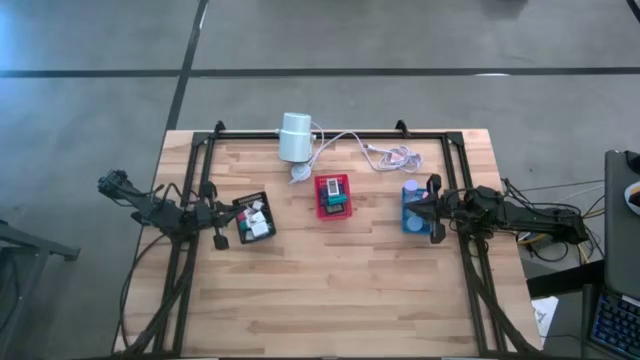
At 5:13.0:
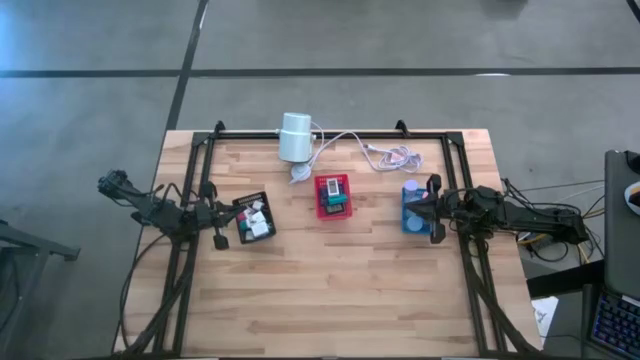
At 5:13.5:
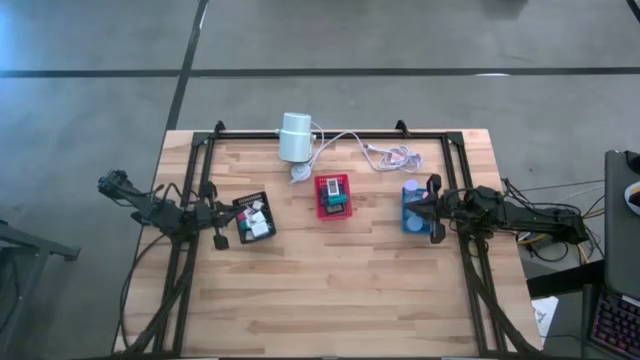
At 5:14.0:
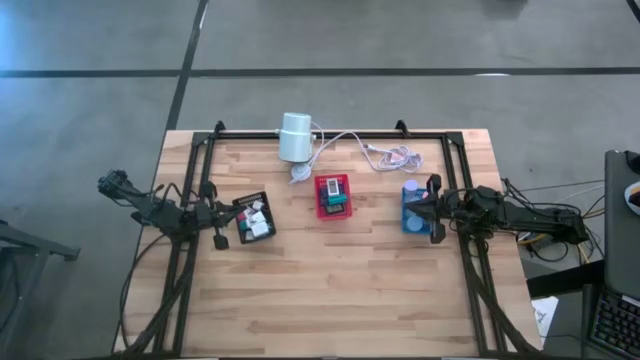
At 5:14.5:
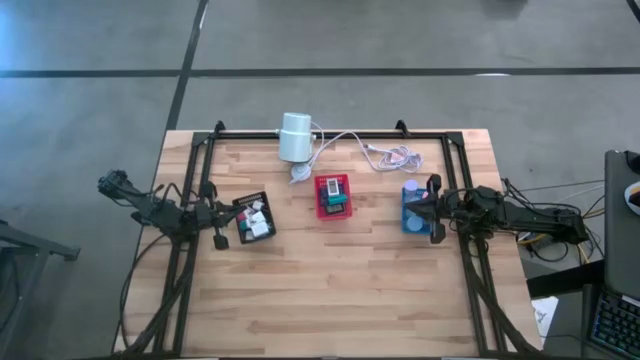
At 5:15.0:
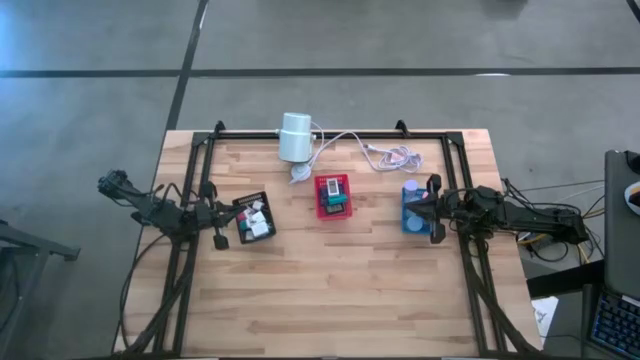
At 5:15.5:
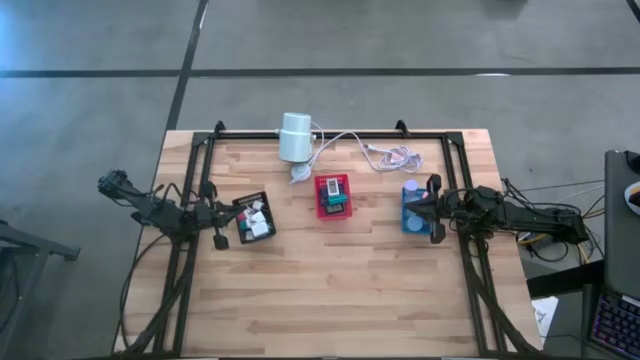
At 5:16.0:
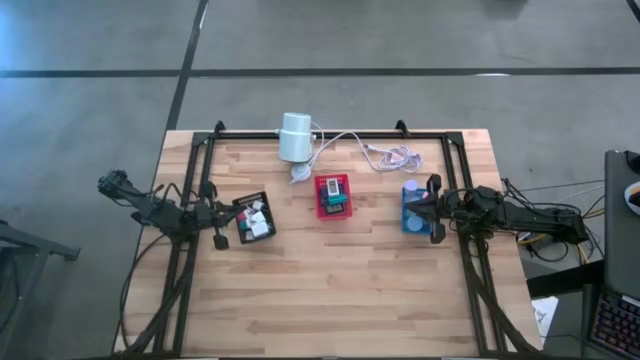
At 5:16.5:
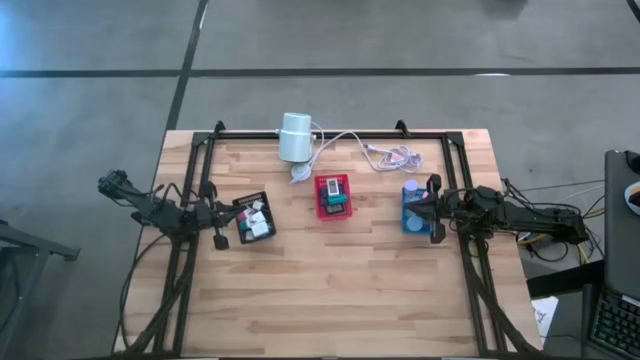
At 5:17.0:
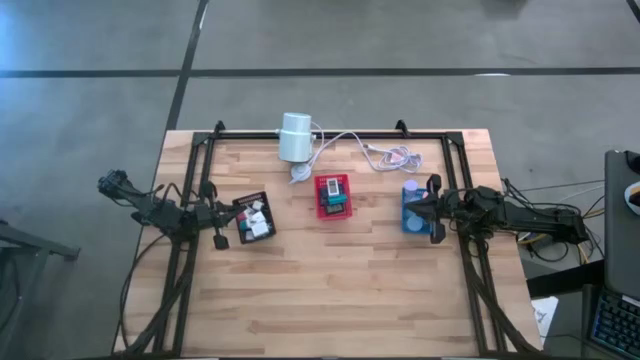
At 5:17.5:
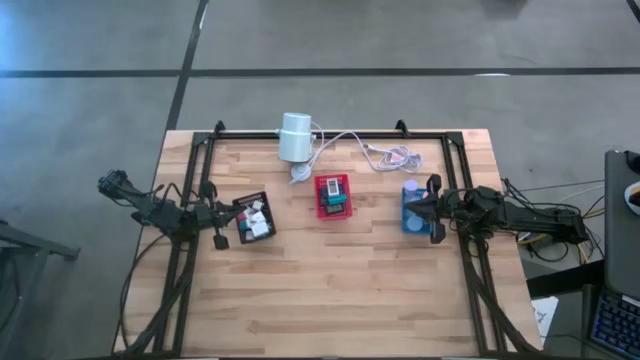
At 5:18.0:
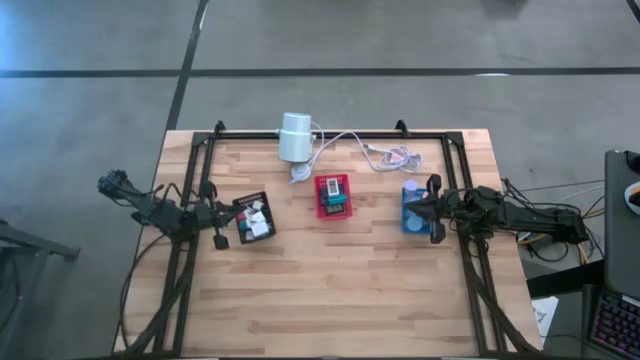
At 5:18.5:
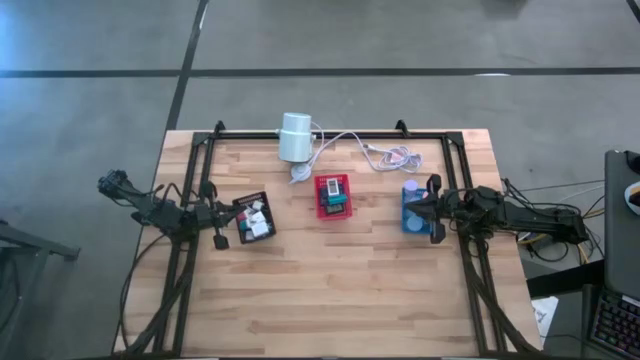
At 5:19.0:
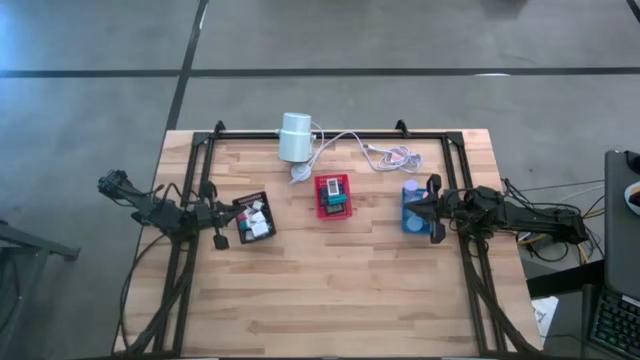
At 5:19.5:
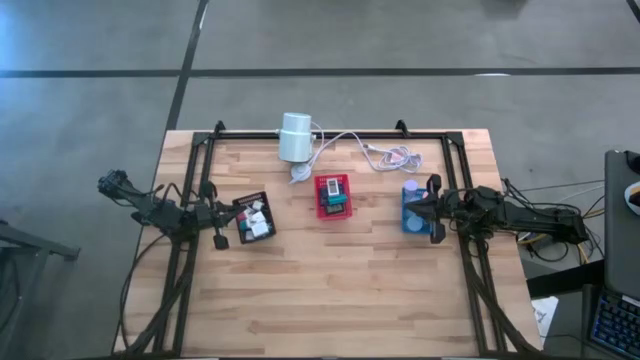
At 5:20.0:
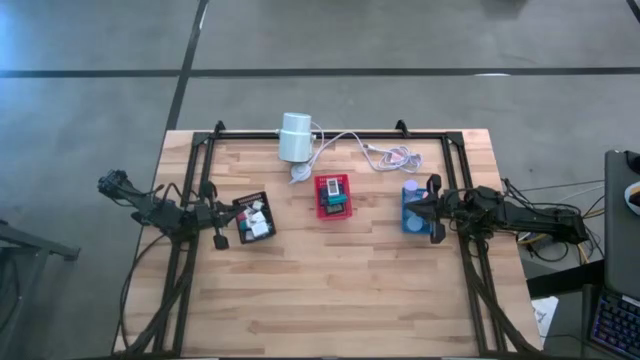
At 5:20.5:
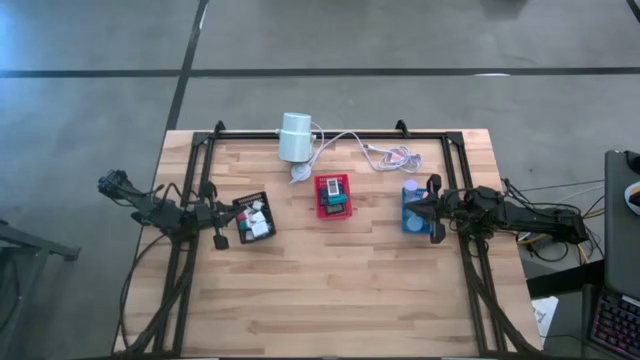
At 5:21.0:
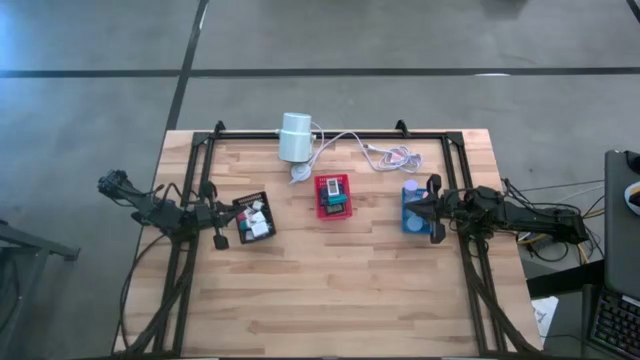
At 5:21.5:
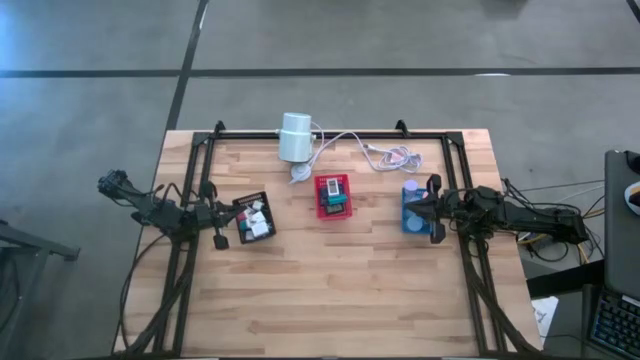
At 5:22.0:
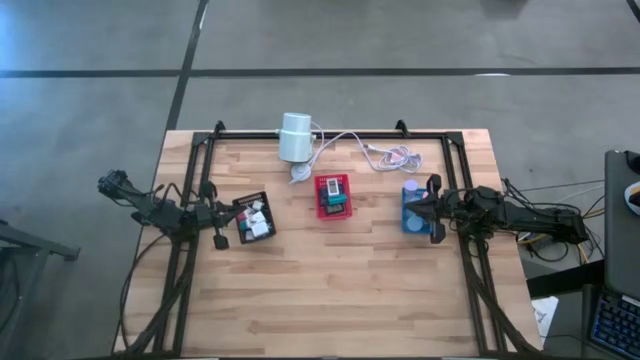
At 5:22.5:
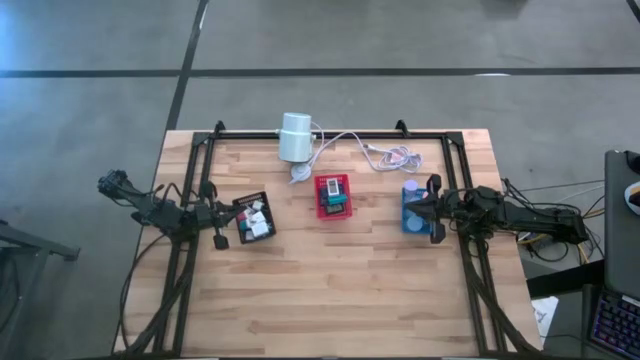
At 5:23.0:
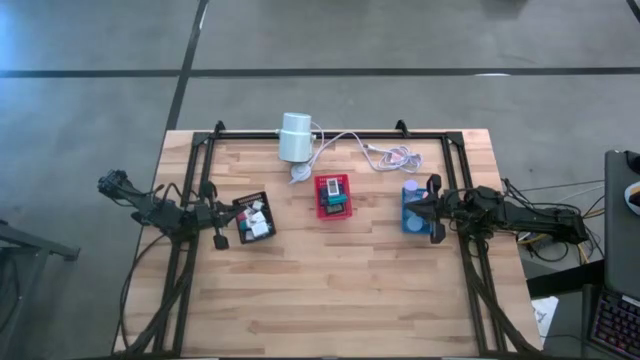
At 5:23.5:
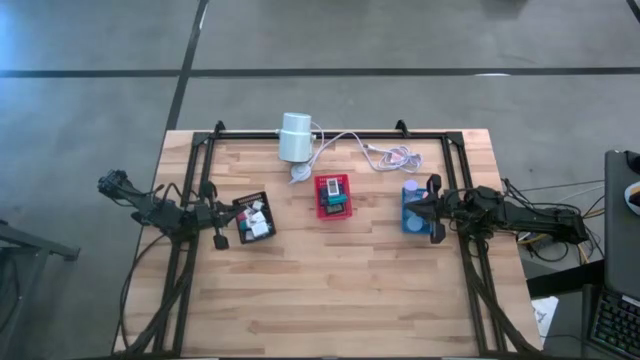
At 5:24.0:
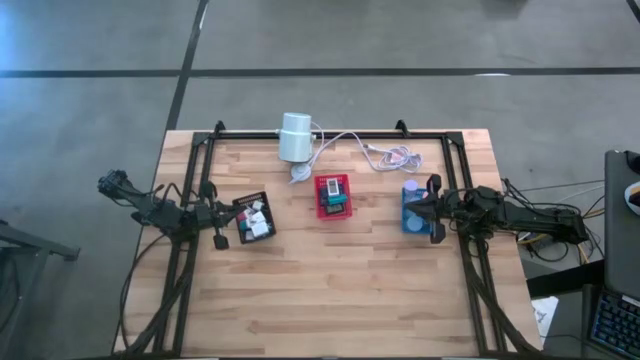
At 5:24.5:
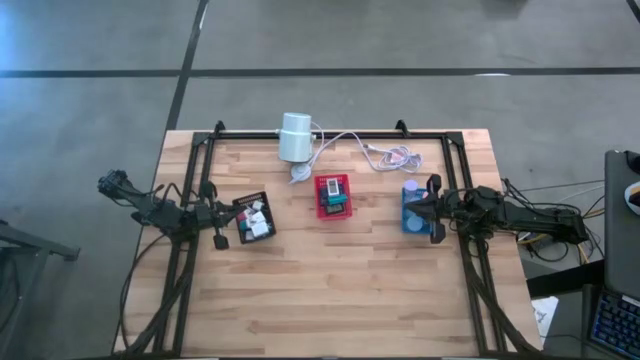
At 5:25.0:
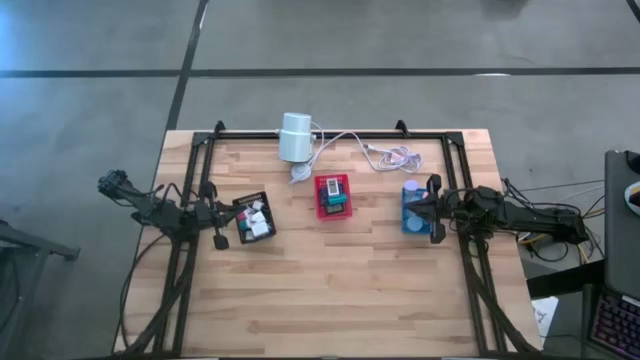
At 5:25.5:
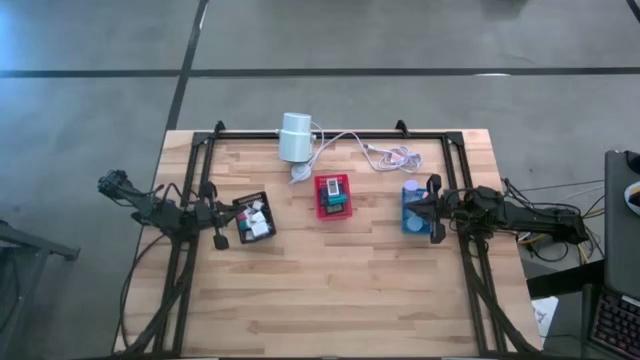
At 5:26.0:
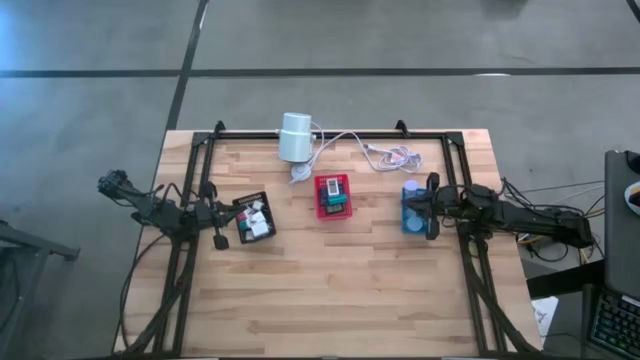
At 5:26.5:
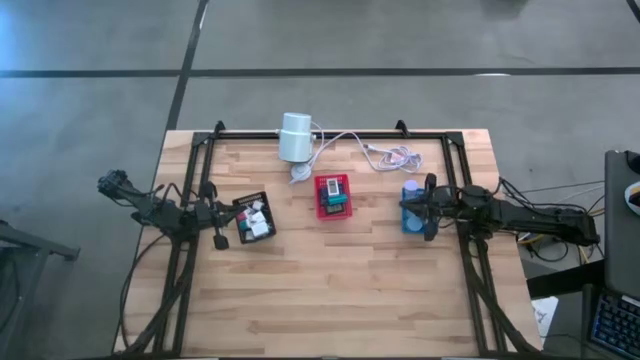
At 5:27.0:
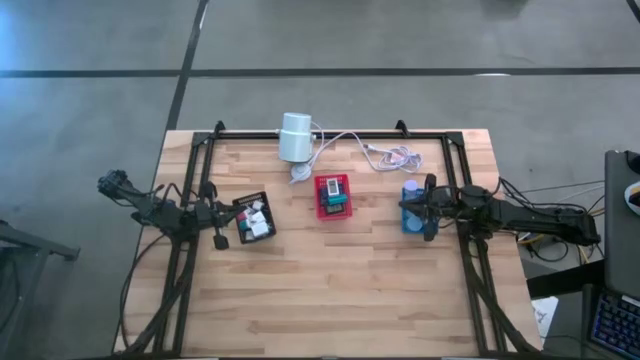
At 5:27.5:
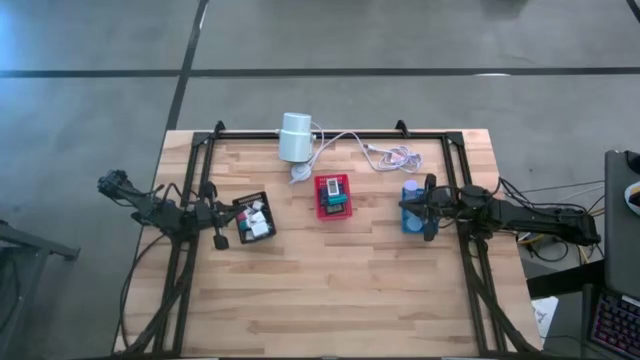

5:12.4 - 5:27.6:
Task: Pick & Place Office items
Return to Home Position
